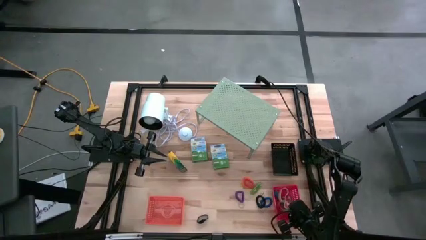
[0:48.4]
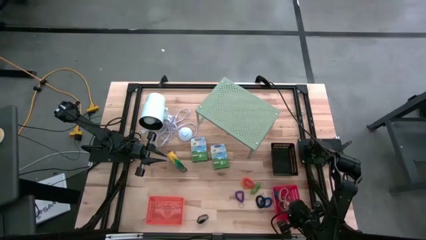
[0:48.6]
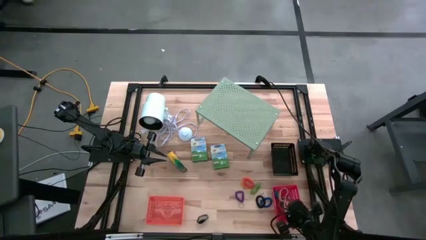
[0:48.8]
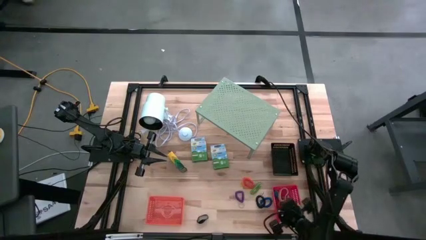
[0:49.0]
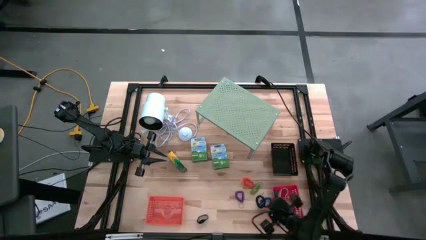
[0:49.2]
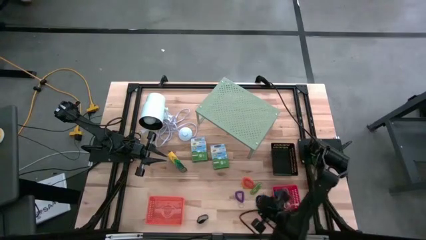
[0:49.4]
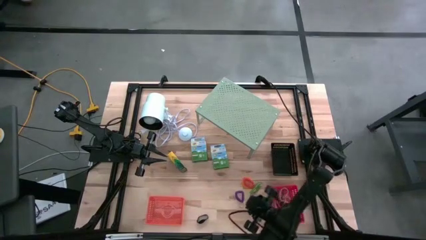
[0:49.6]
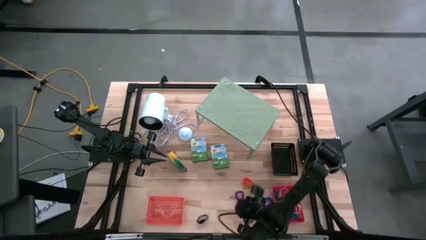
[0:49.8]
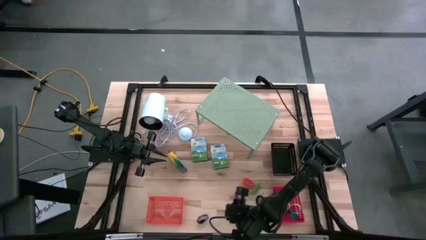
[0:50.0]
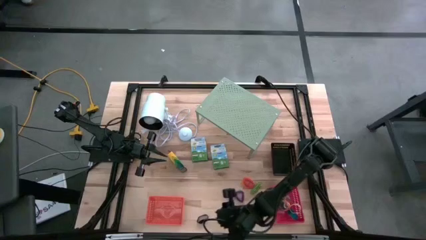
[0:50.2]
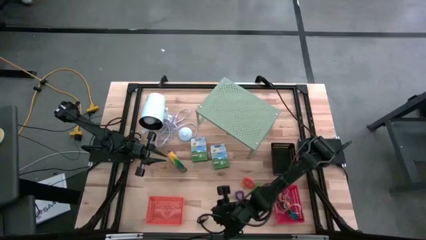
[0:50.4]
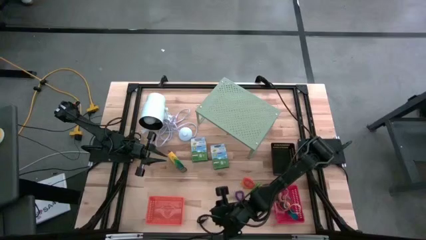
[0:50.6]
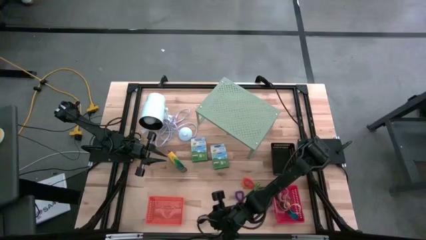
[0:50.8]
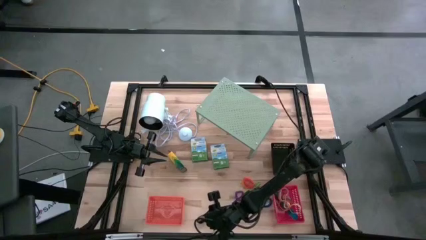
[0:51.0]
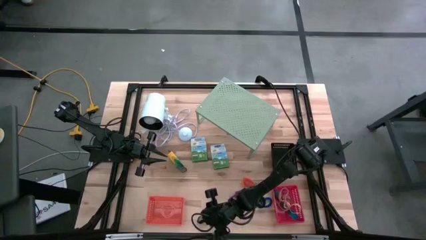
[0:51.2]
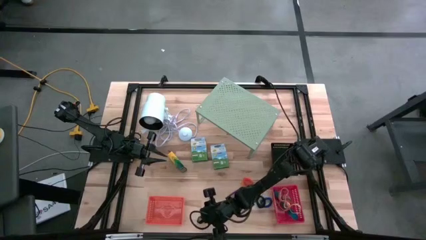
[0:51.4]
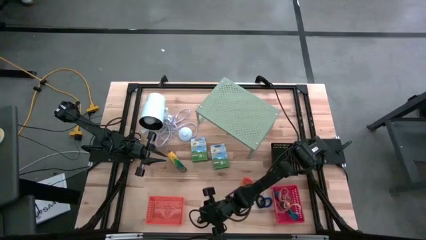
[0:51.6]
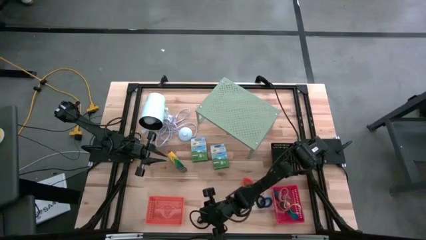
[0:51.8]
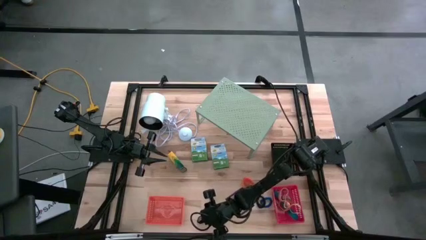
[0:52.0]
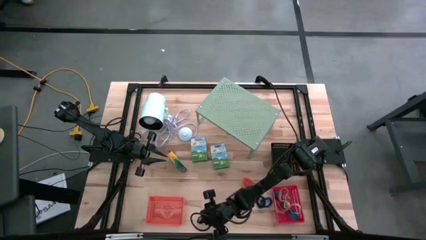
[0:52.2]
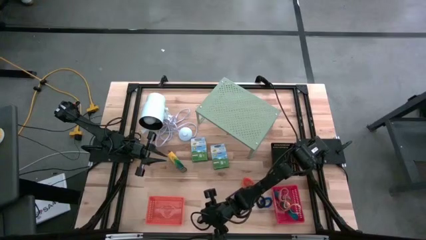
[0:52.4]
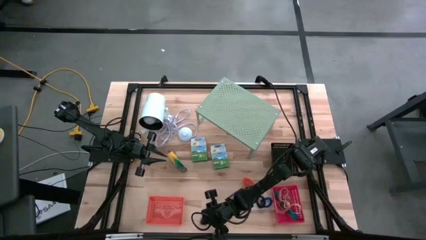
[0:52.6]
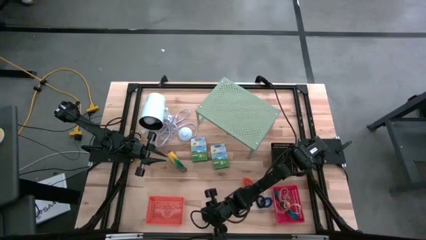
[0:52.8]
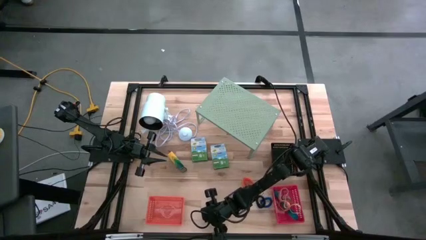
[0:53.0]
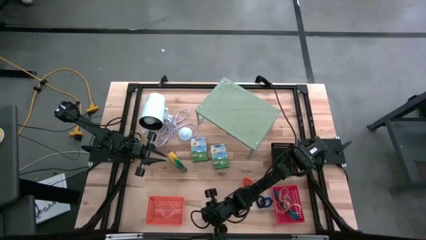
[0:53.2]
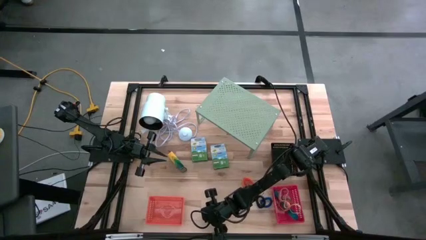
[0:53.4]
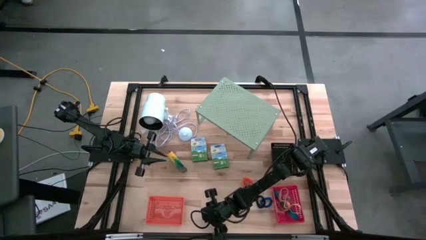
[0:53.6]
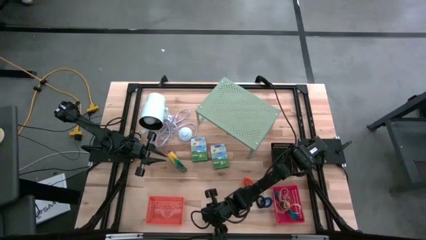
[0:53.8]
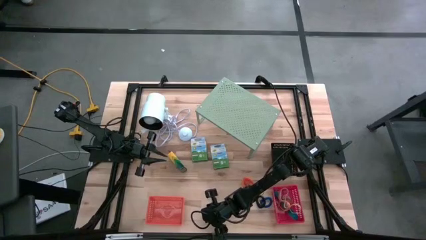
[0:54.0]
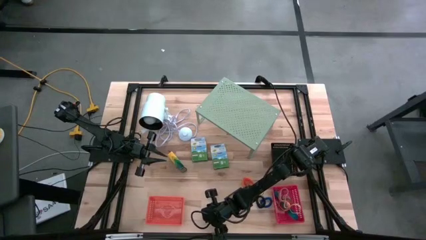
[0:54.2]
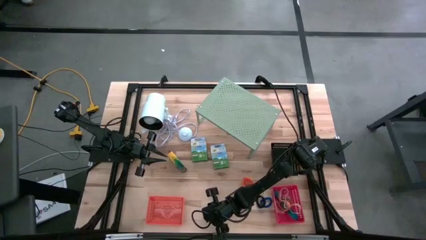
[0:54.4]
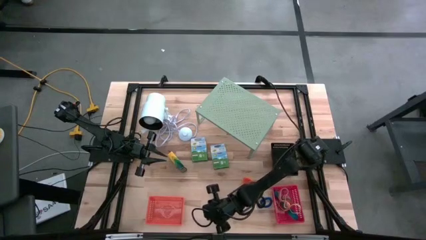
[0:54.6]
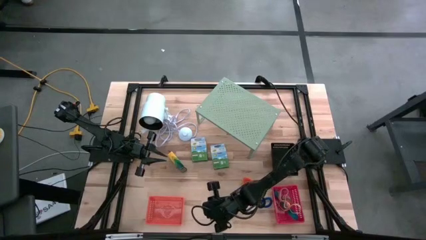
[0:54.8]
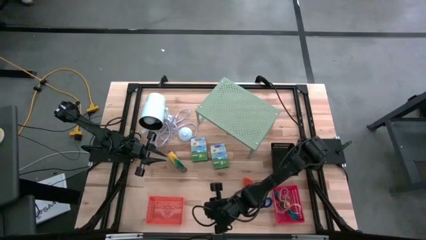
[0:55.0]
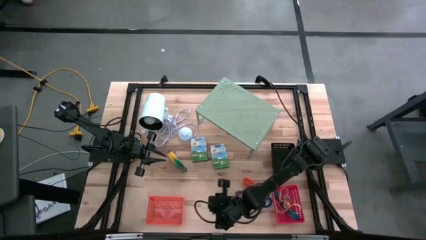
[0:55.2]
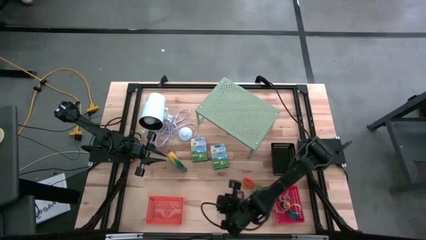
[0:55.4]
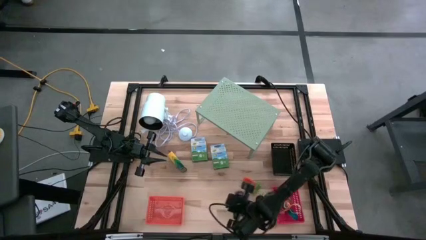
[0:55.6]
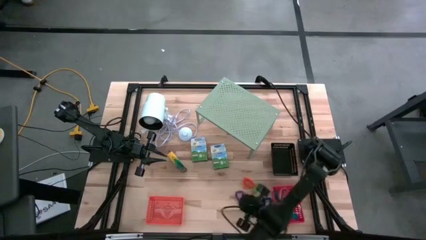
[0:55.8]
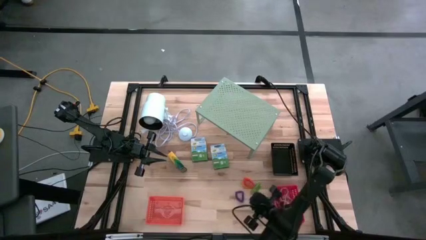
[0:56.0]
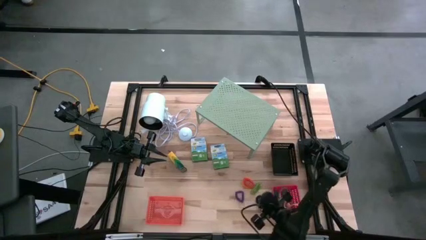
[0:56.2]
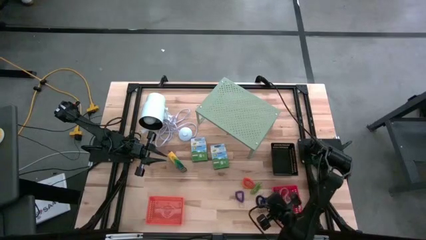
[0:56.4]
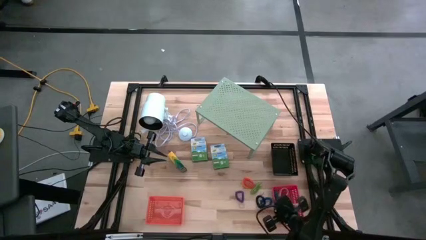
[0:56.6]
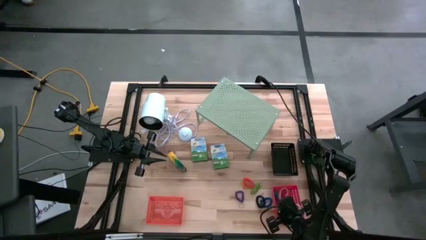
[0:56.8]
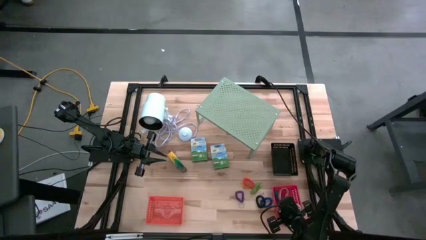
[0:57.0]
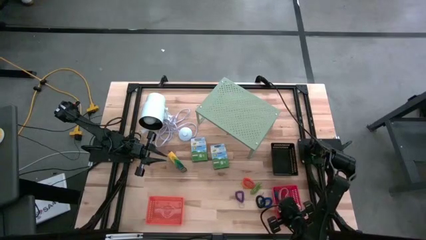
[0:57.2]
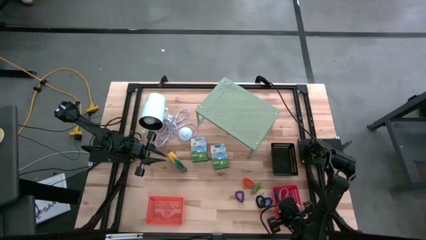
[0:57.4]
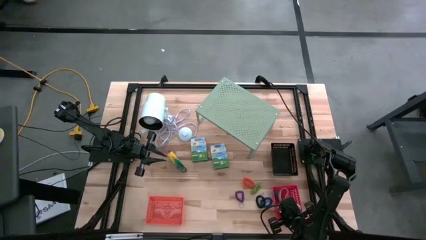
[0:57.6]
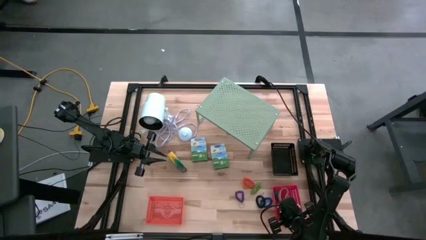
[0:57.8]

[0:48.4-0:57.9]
Task: Pick & Place Office Desk Supplies
Put the black rubber band into the red bin
